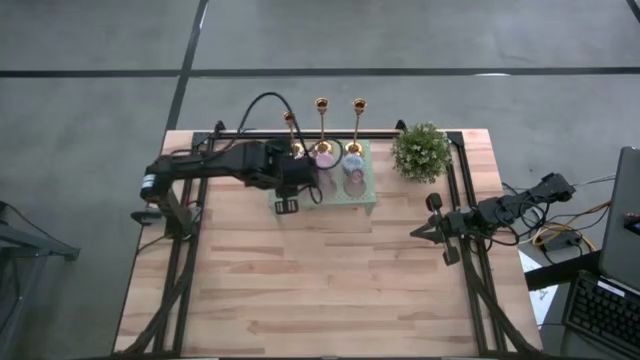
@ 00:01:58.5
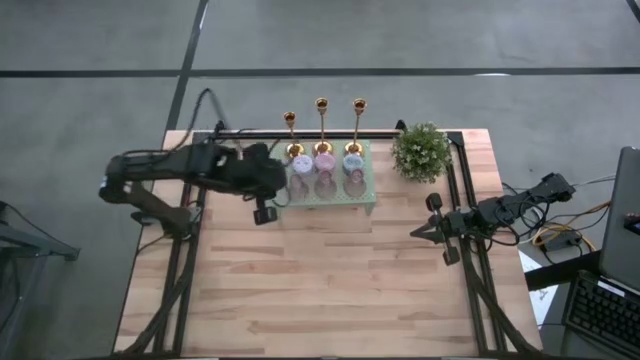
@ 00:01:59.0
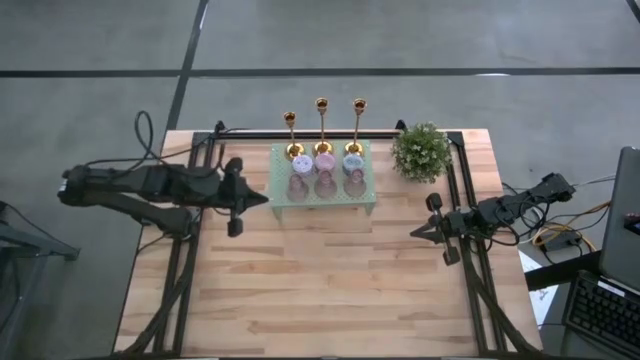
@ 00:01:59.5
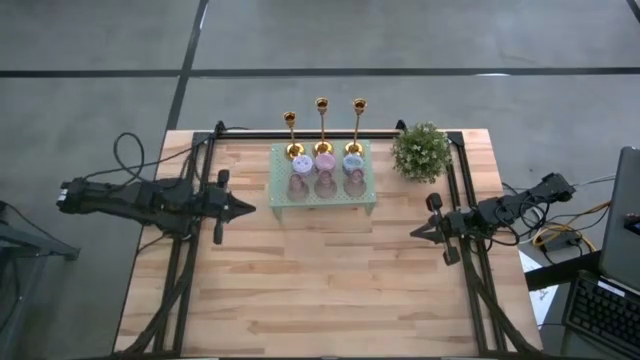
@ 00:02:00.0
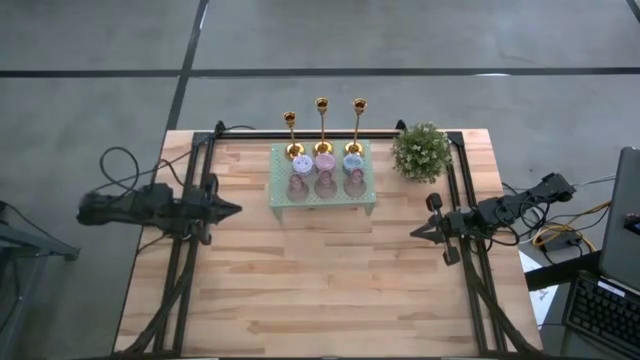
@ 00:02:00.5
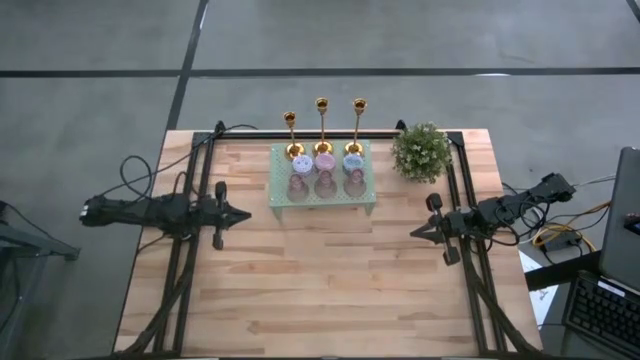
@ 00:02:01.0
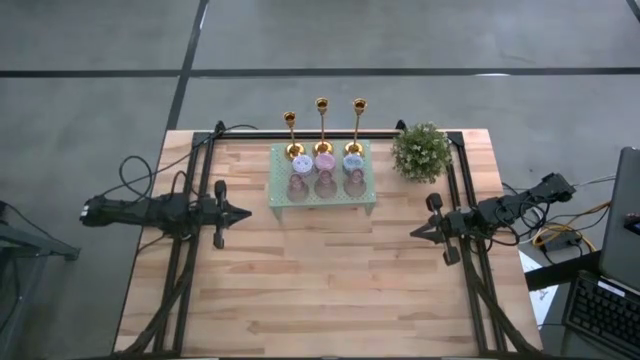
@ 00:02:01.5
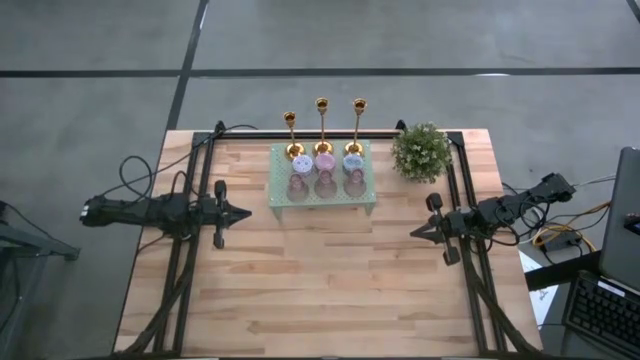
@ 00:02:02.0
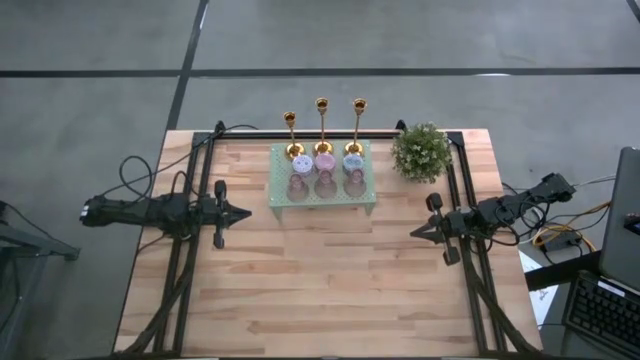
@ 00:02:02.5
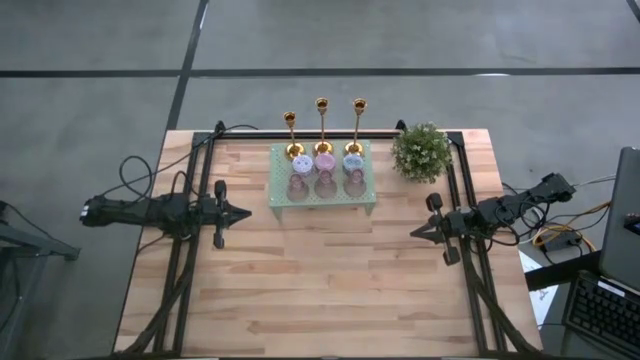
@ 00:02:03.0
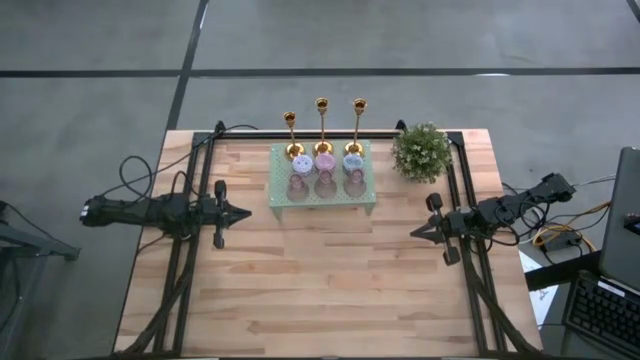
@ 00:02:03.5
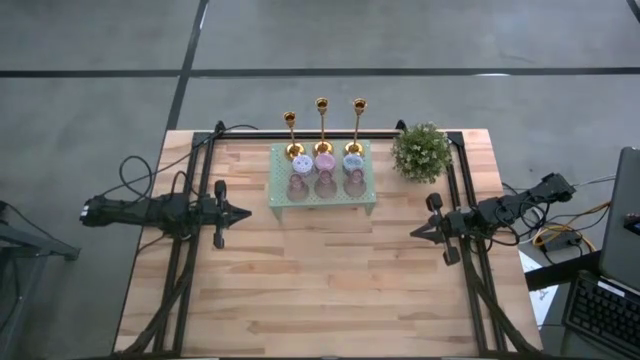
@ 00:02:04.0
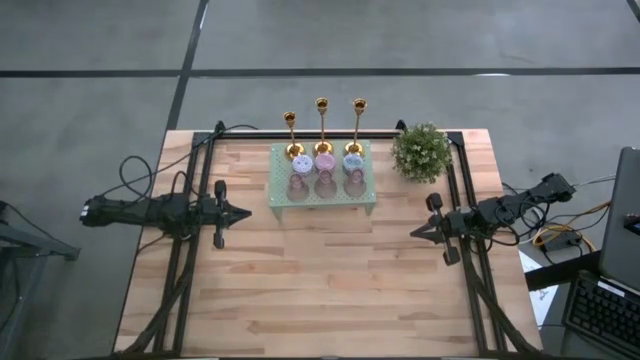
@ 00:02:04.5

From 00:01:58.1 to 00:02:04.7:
Task: Pick & Place candle stick holders
Return to Home Position

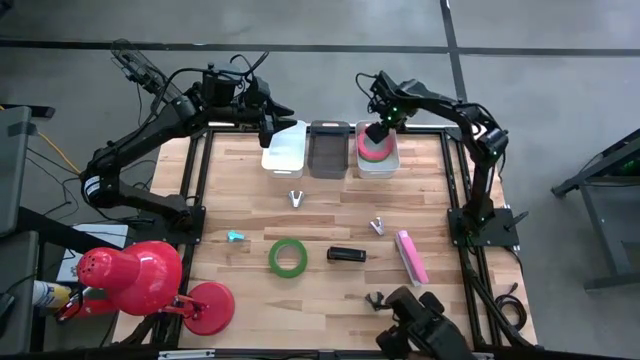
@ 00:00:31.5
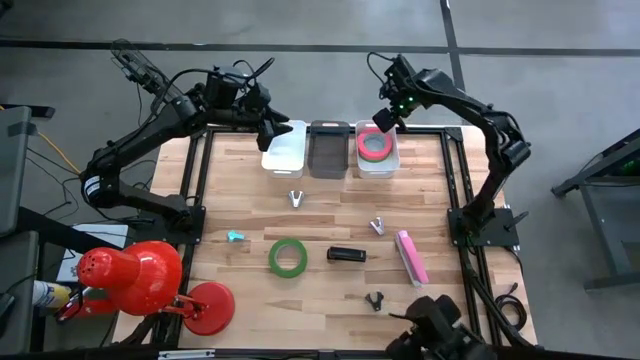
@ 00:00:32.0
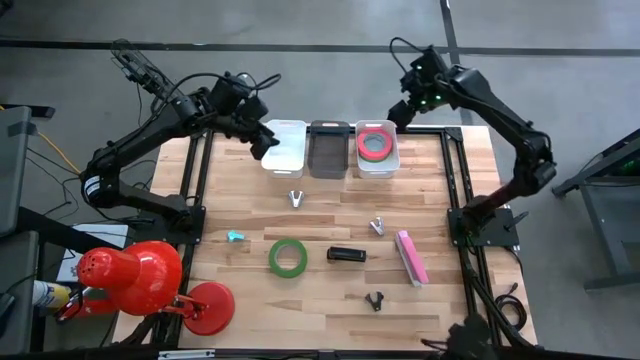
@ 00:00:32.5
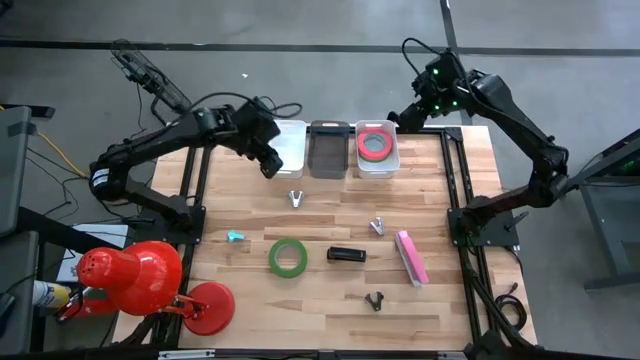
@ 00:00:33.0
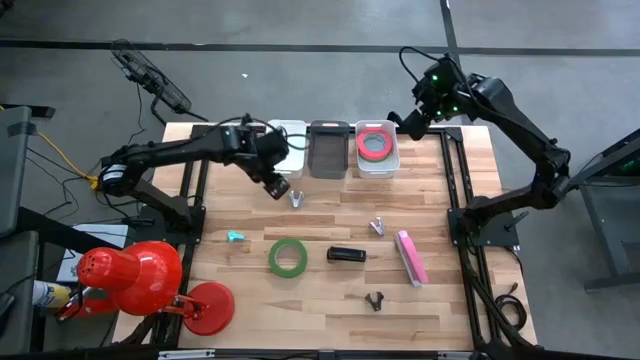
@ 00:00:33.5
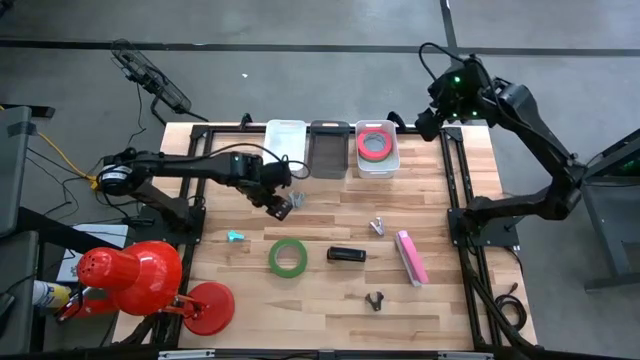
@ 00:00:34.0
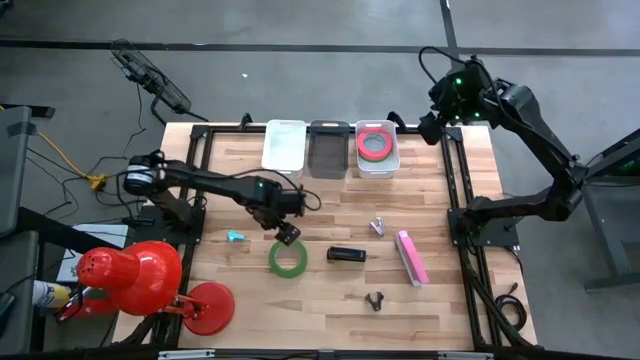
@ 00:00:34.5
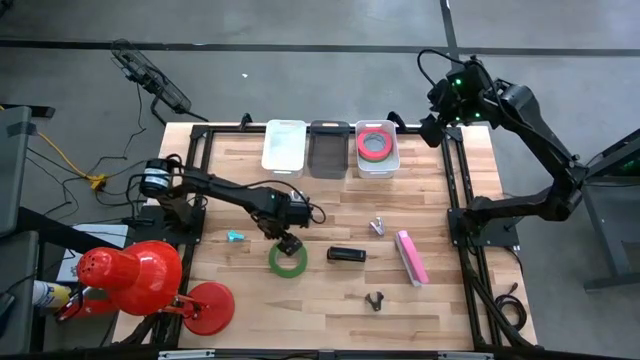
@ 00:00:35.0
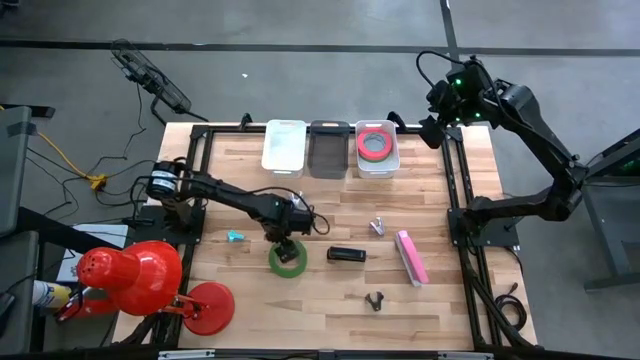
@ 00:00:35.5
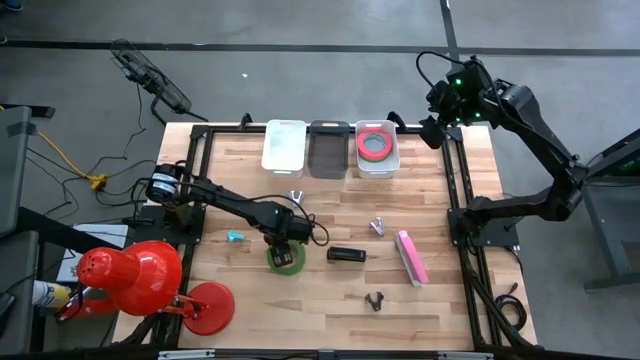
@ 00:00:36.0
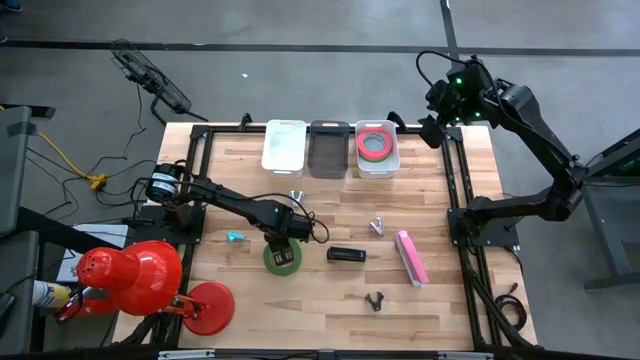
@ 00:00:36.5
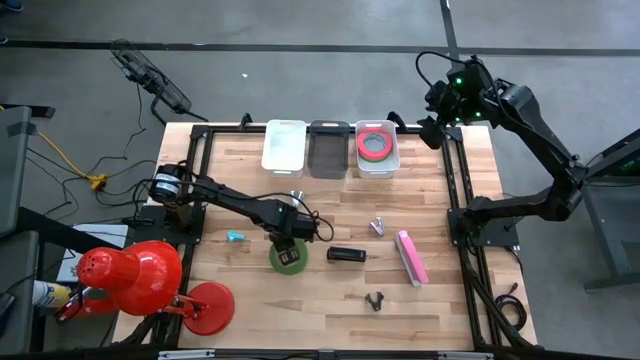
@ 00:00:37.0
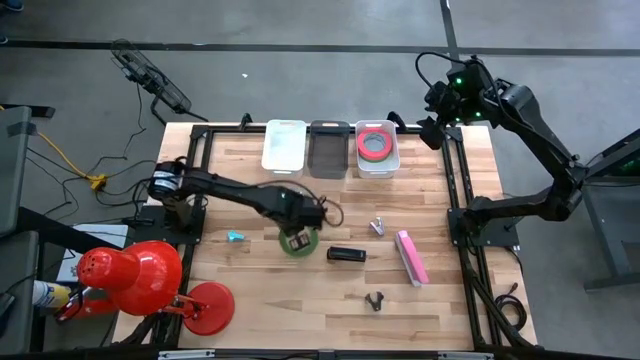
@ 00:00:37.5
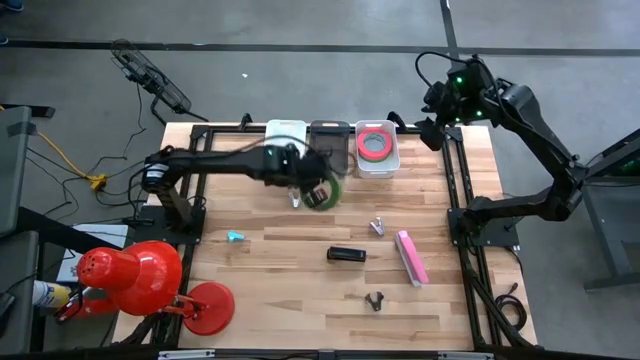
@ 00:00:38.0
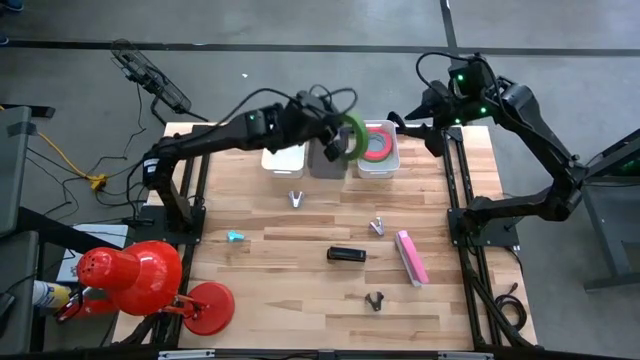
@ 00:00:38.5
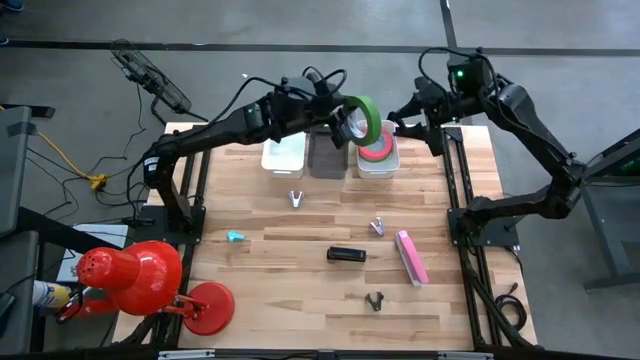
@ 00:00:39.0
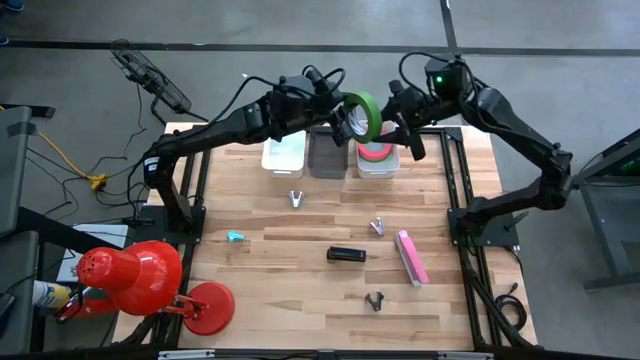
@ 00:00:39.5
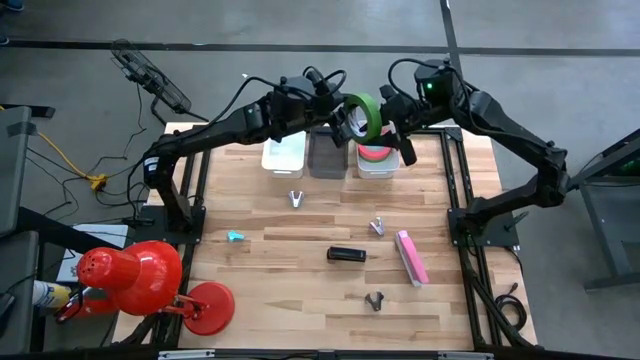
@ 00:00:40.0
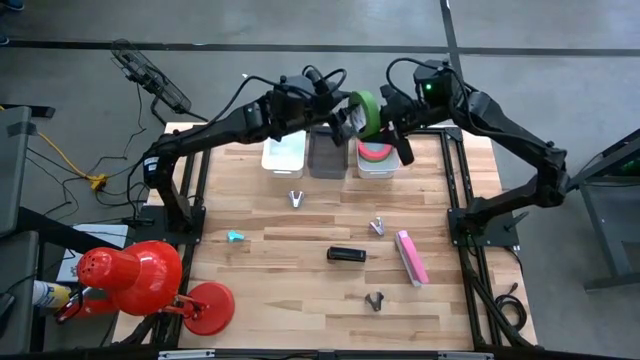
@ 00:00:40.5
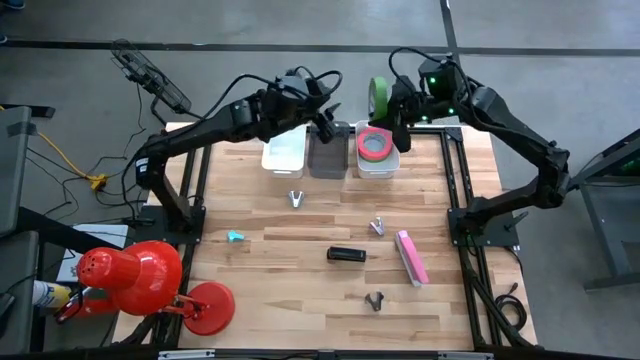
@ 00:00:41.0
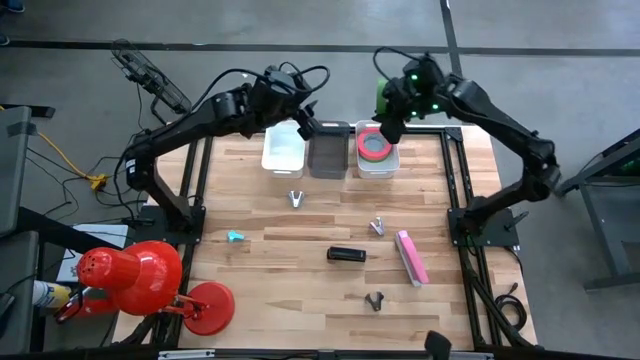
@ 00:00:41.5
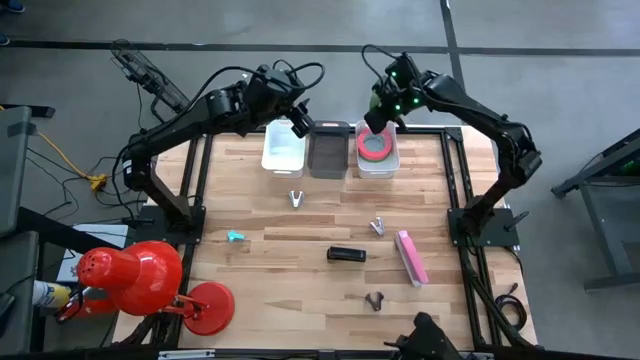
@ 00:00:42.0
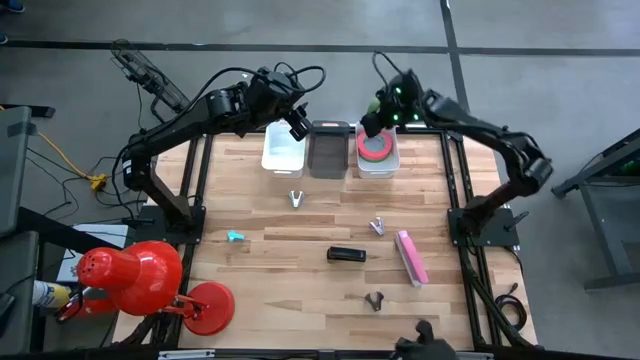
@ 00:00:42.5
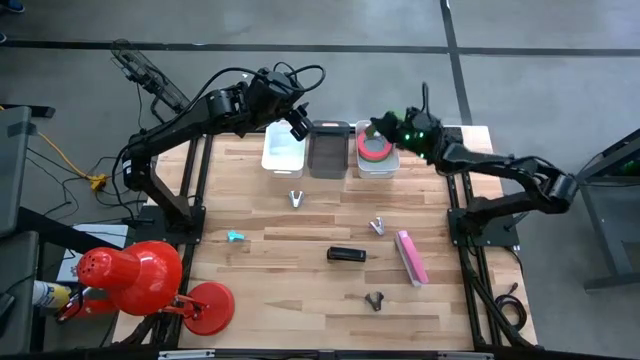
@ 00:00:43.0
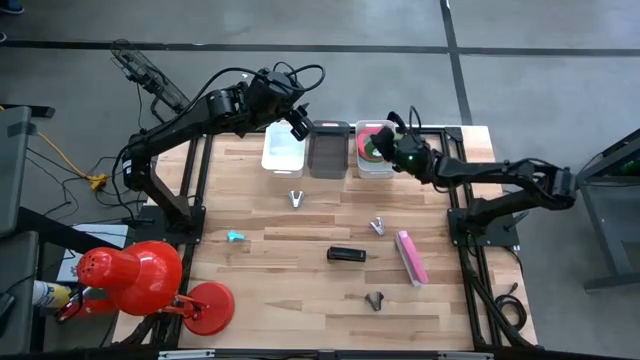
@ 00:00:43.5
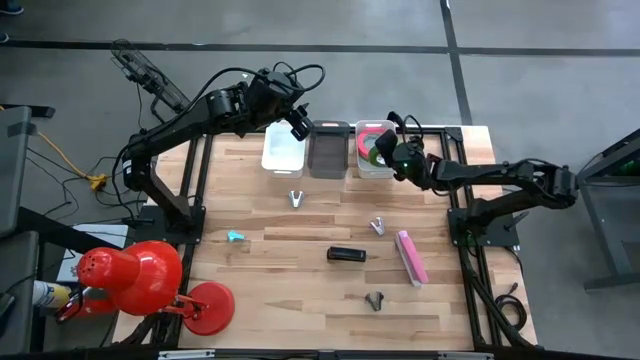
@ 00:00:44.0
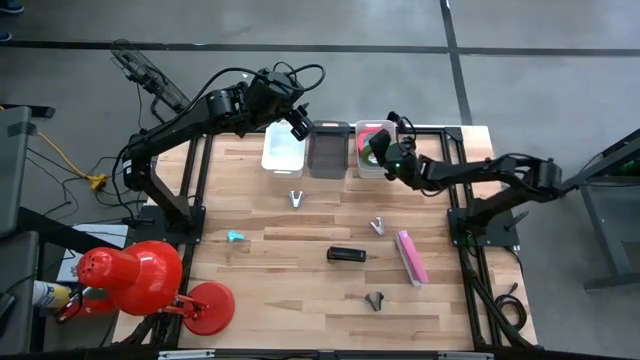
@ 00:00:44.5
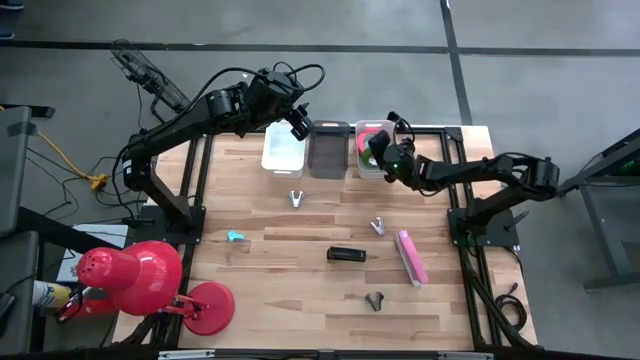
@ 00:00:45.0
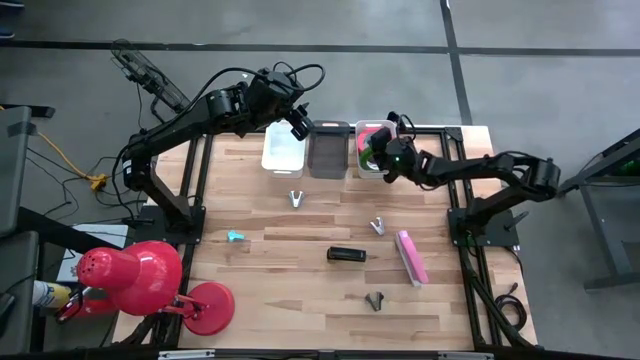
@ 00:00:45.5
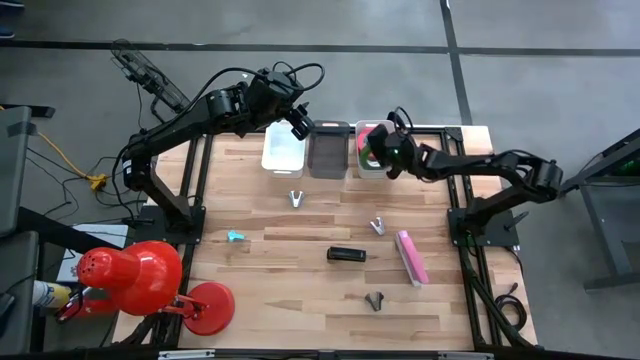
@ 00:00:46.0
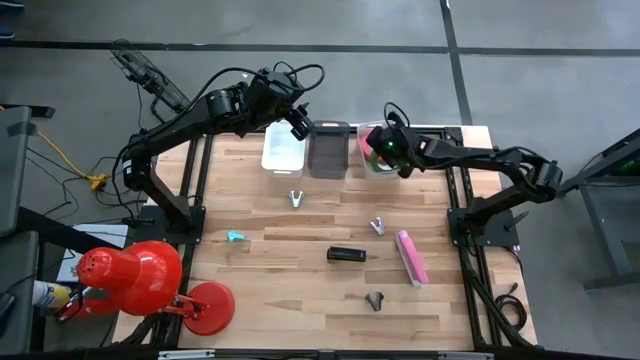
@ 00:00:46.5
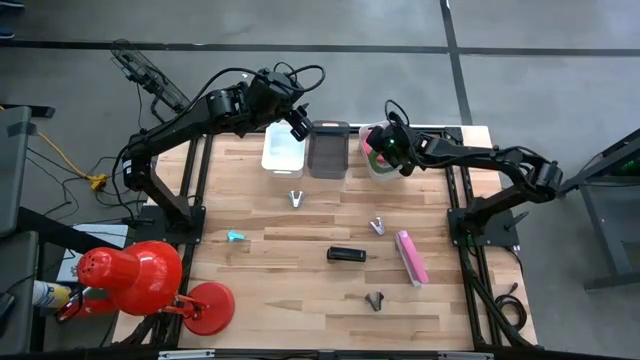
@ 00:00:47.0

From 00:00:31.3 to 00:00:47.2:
Task: Pick and place Stapler, Stapler remover, tape
Put the green tape into the right white bin
